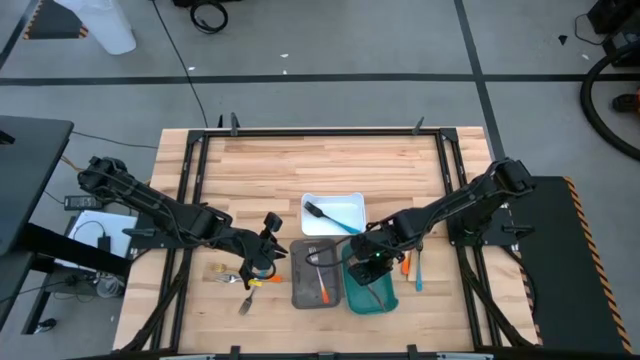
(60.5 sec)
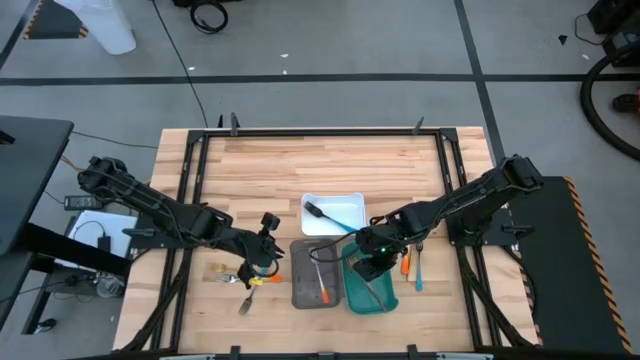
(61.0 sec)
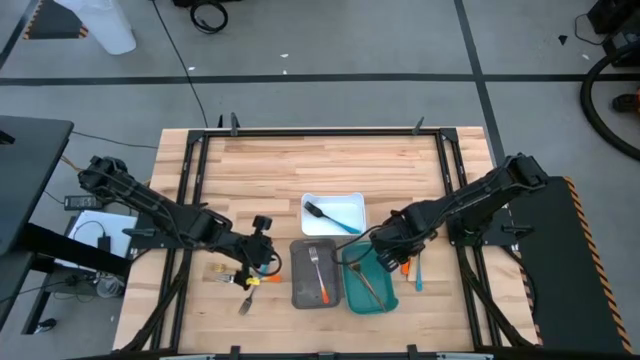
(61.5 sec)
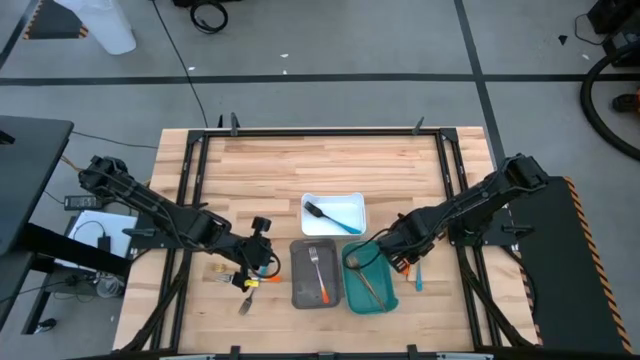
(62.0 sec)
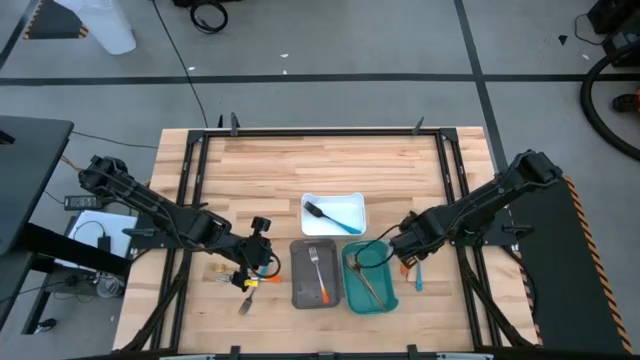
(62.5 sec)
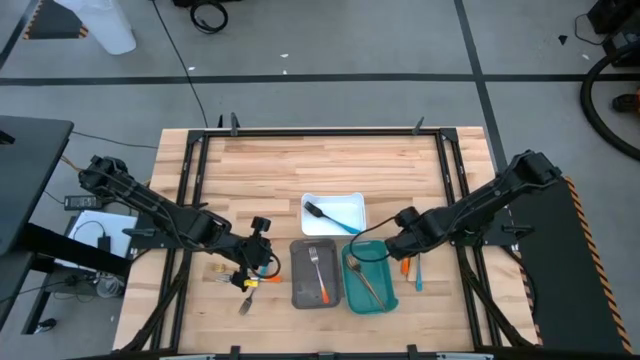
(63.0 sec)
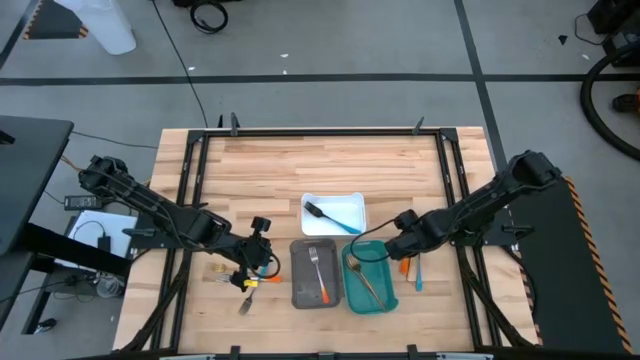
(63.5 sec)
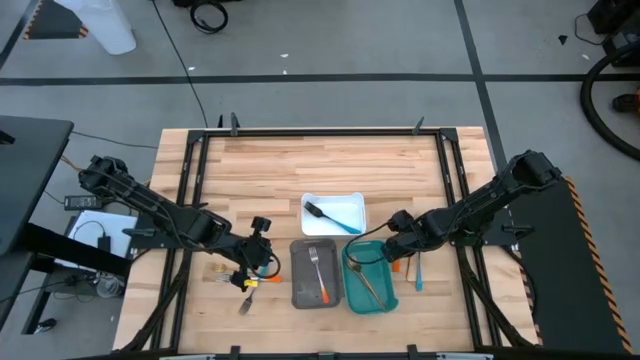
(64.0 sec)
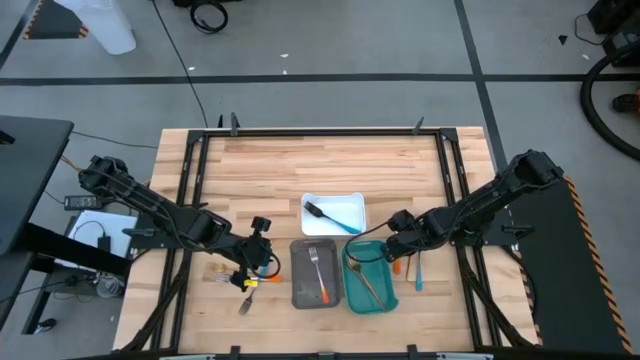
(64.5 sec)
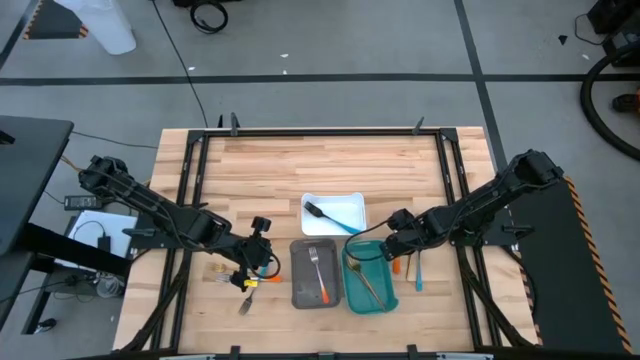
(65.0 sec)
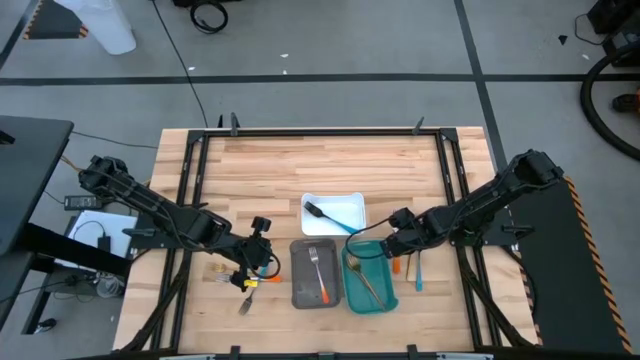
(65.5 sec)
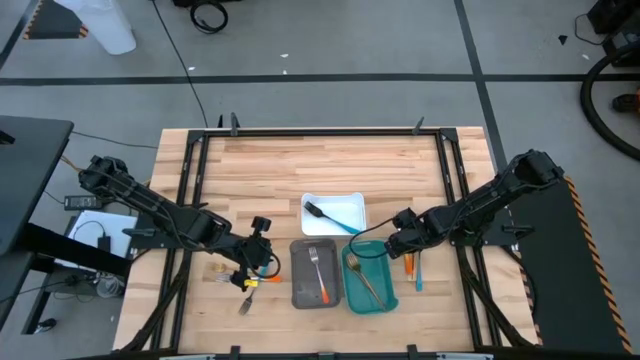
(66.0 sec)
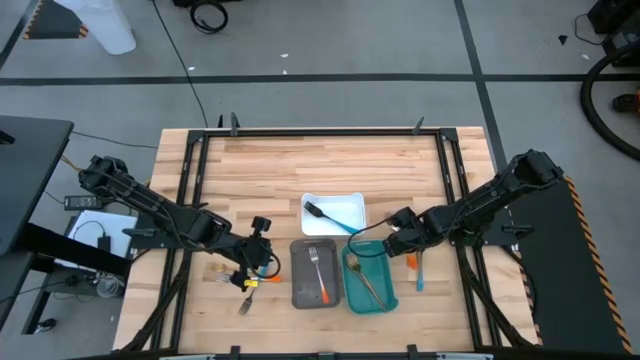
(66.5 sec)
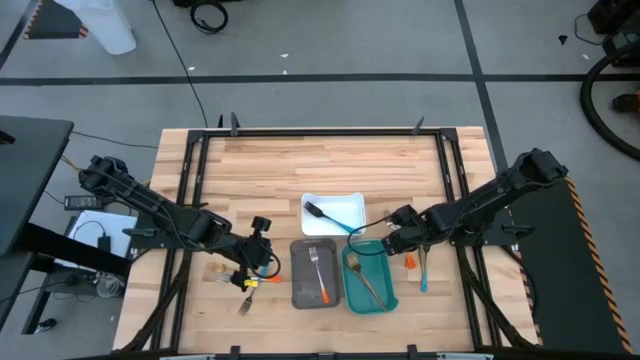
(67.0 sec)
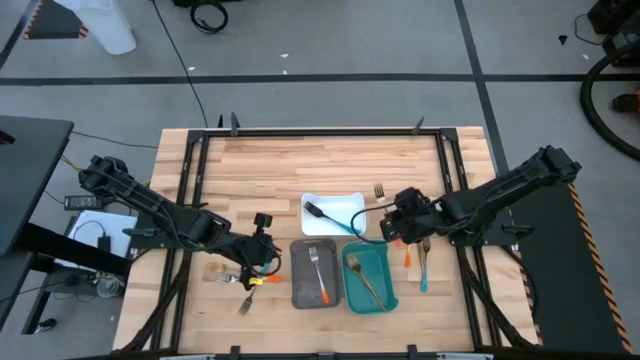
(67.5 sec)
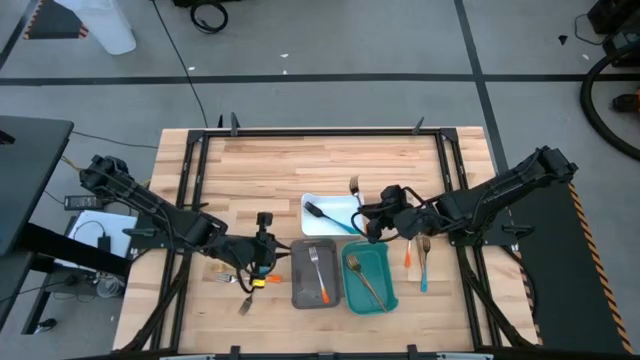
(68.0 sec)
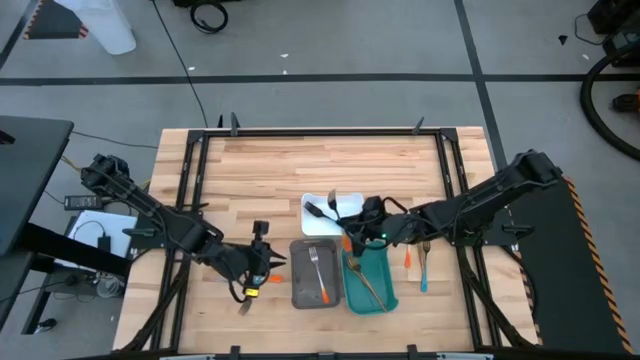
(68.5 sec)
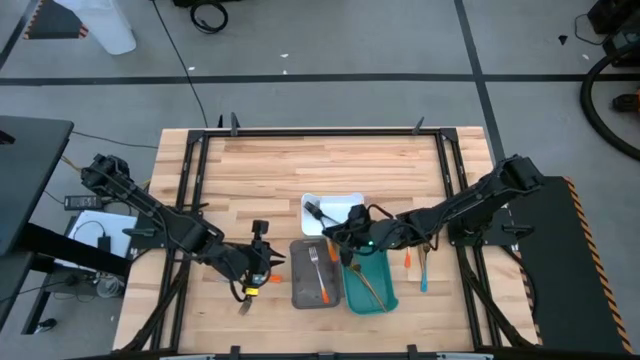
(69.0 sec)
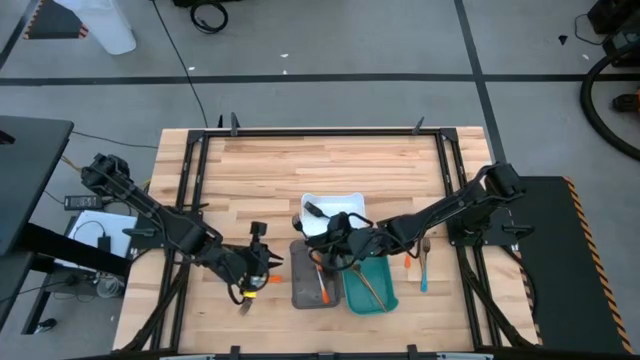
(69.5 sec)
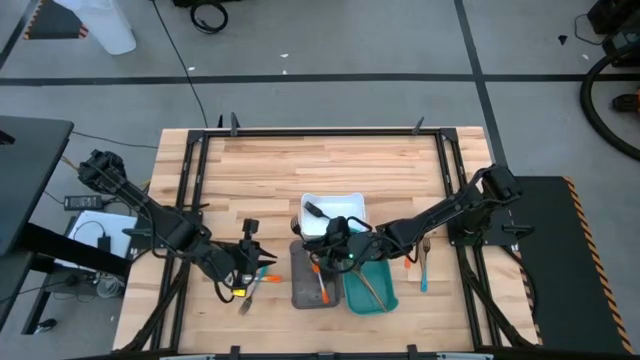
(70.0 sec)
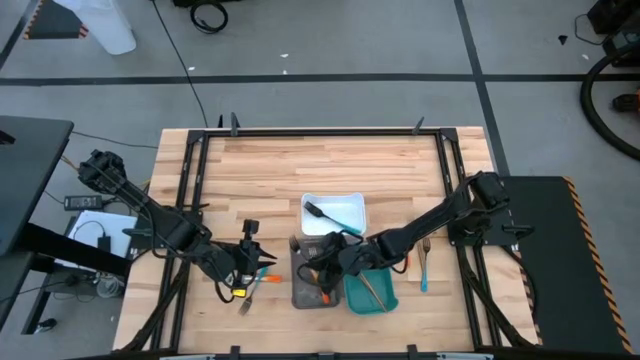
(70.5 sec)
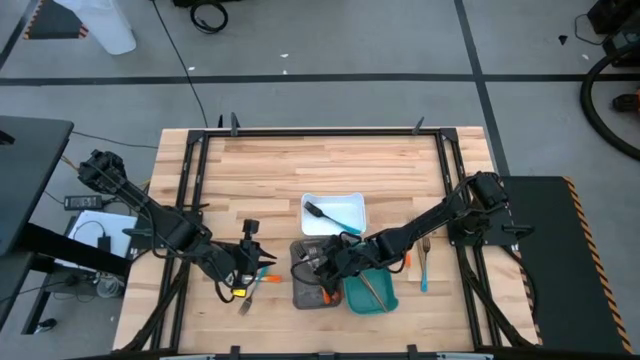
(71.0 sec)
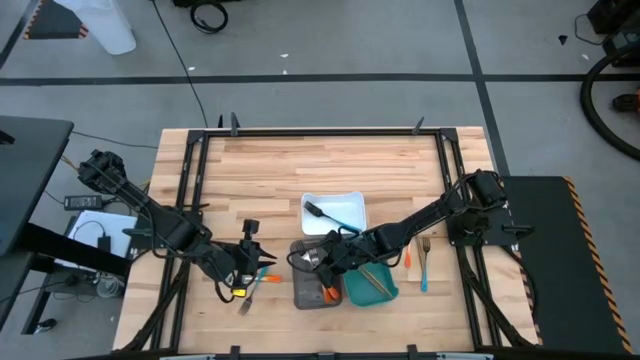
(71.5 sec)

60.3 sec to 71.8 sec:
Task: Sort silverware by color (type)
Put the orange fork into the black bin

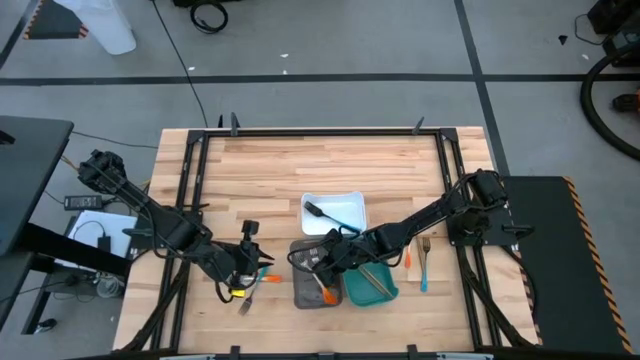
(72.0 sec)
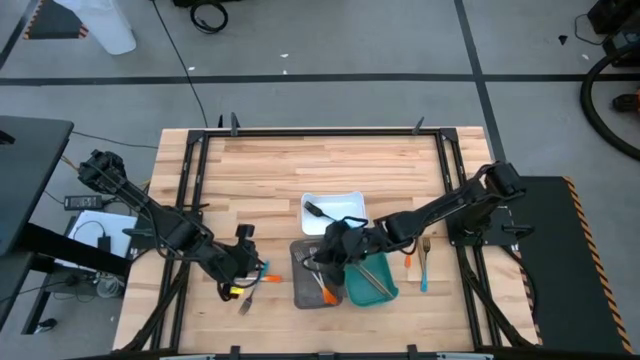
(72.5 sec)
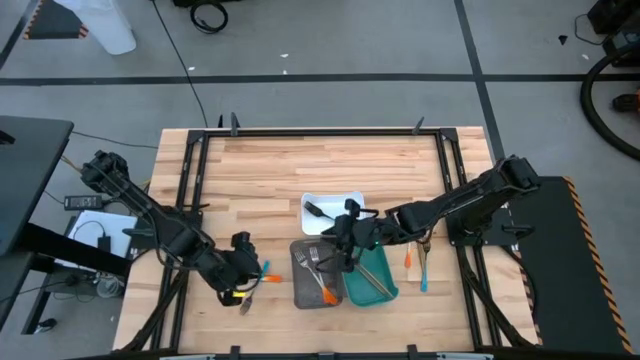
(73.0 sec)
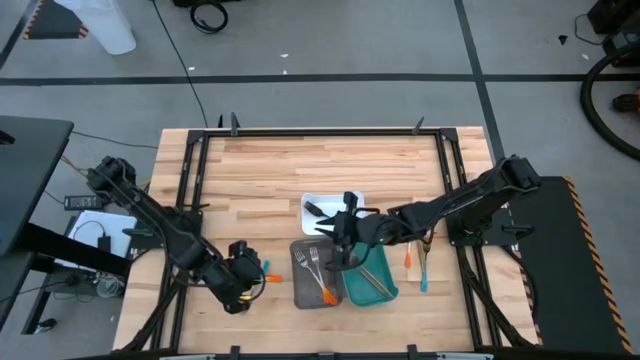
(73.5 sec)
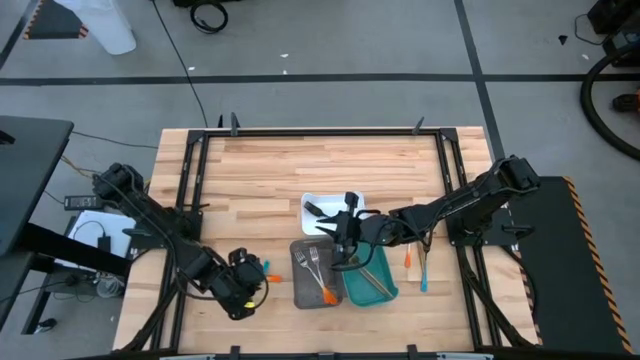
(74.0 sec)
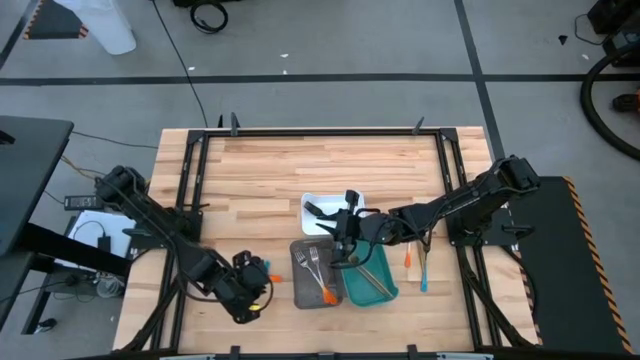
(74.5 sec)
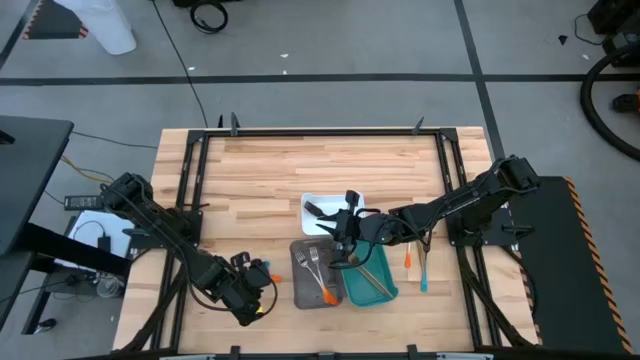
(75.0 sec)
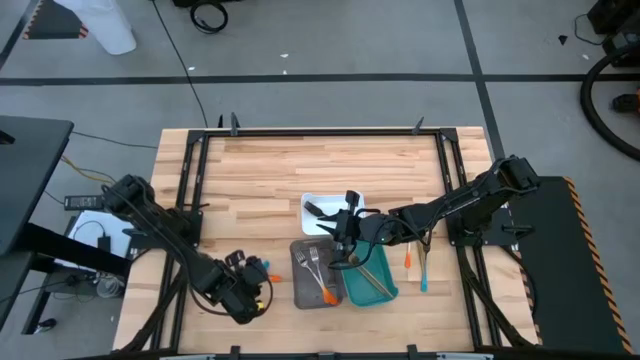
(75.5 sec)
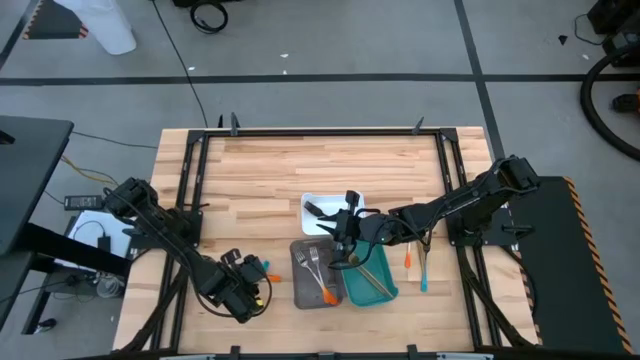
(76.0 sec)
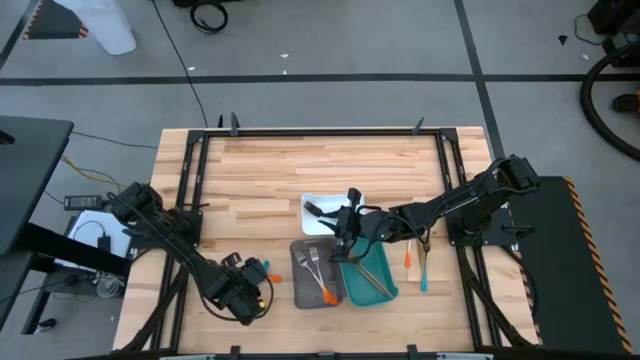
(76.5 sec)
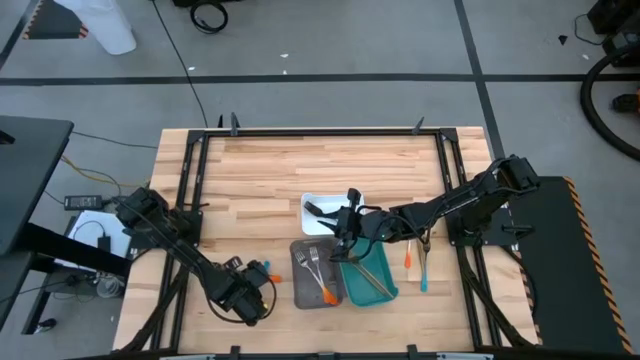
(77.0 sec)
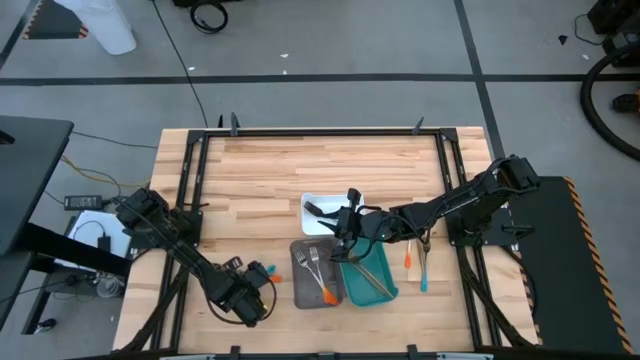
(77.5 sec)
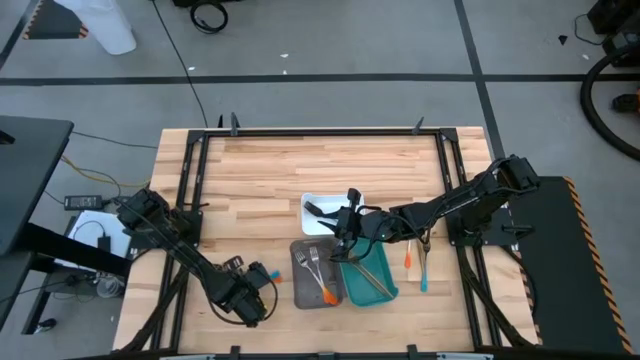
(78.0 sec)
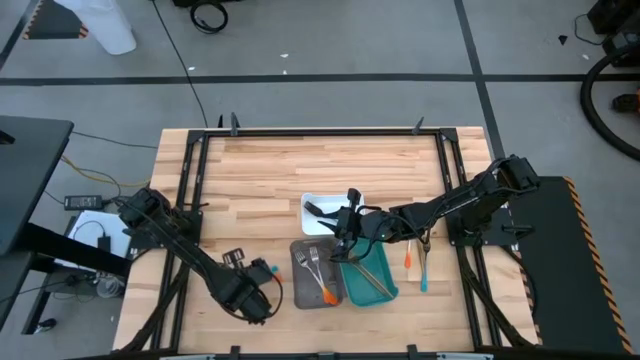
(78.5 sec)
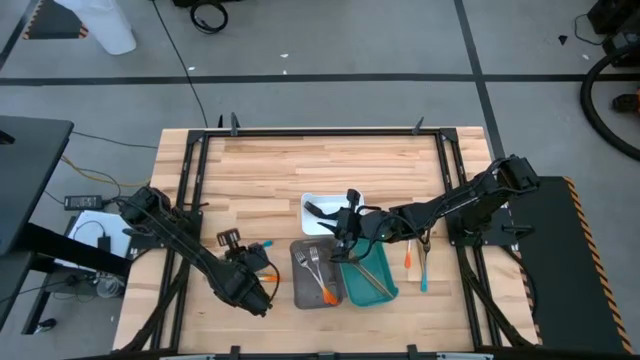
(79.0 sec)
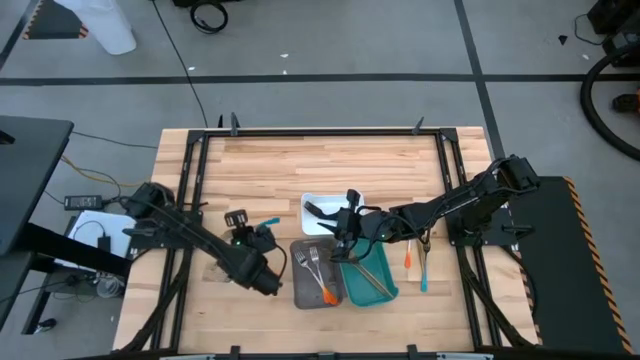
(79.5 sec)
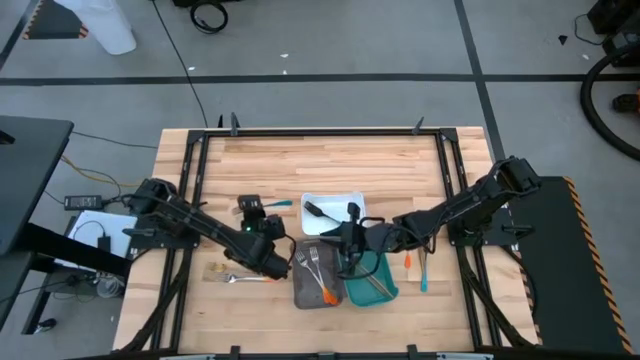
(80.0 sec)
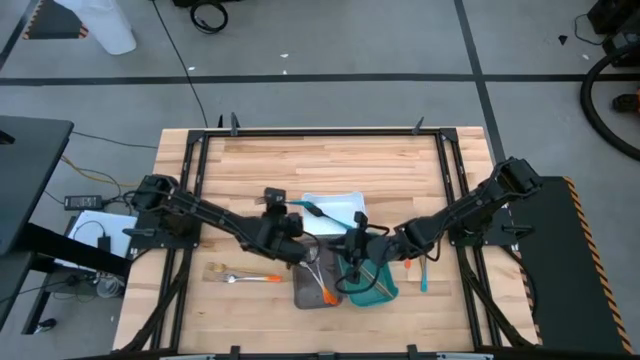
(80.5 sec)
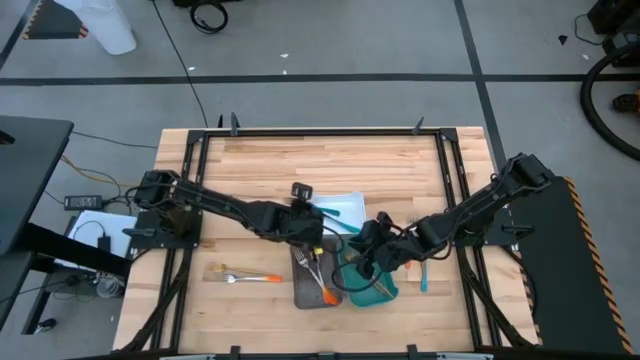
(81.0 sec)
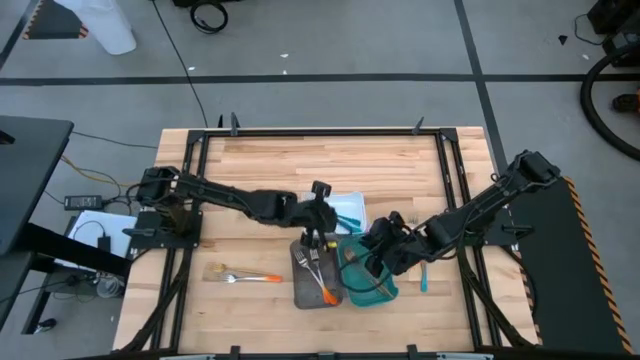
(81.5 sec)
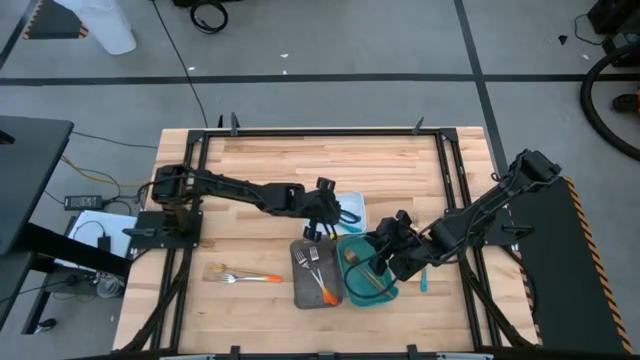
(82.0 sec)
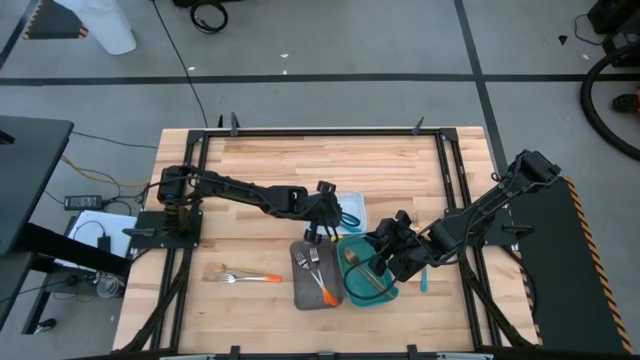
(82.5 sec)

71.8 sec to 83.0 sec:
Put the blue fork into the white bin
